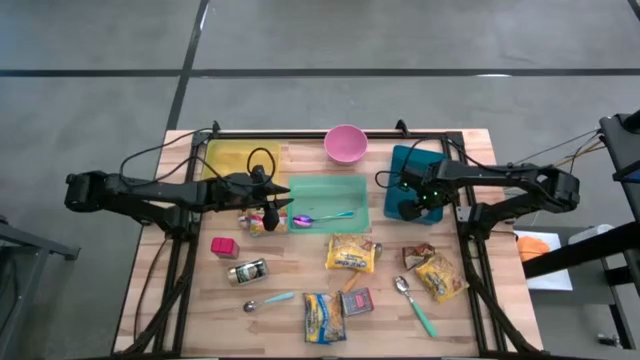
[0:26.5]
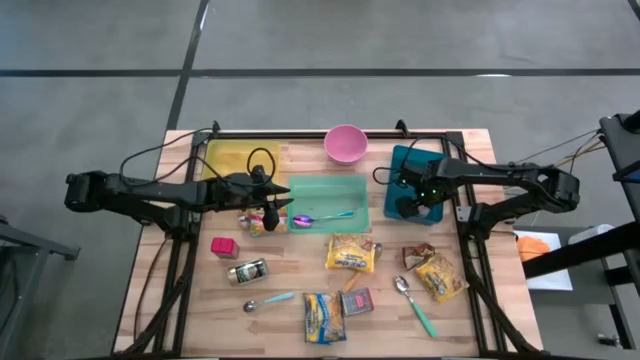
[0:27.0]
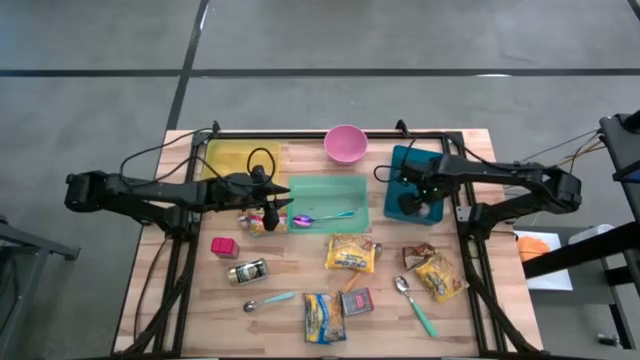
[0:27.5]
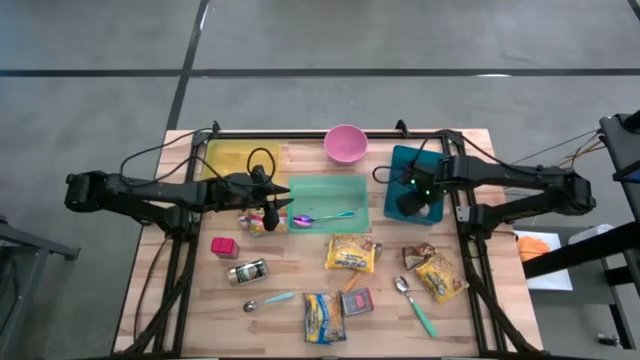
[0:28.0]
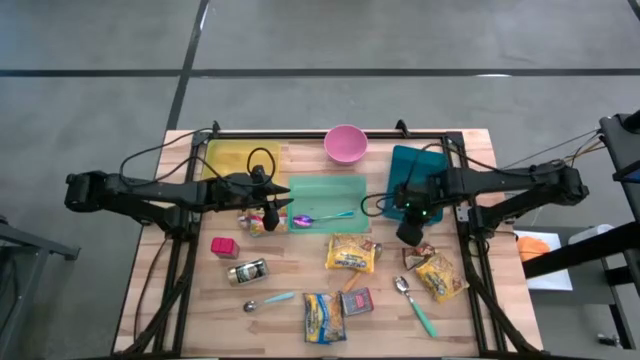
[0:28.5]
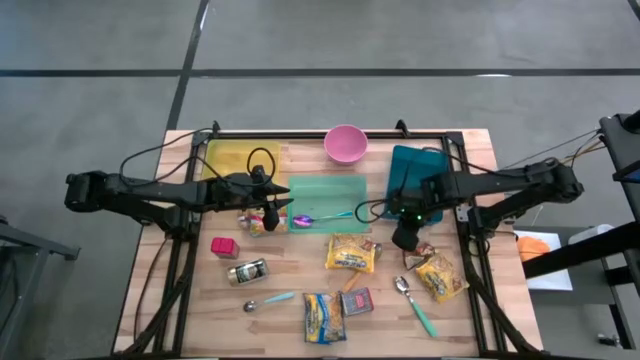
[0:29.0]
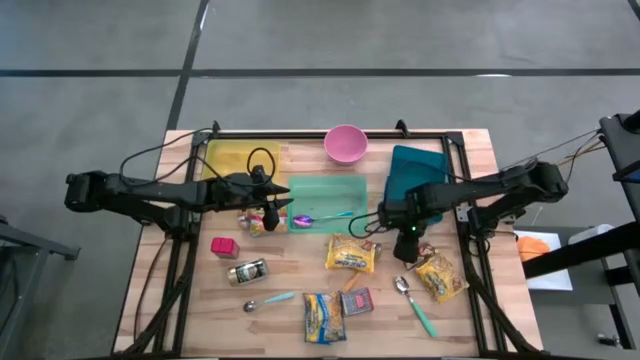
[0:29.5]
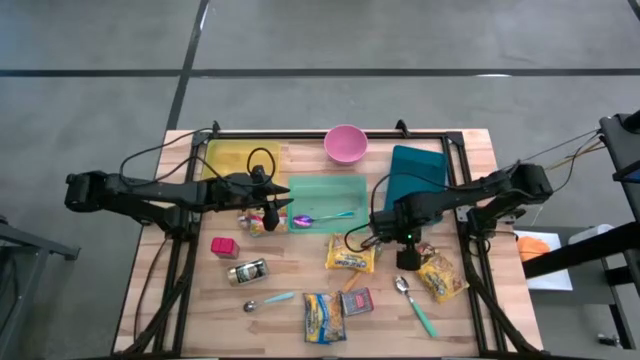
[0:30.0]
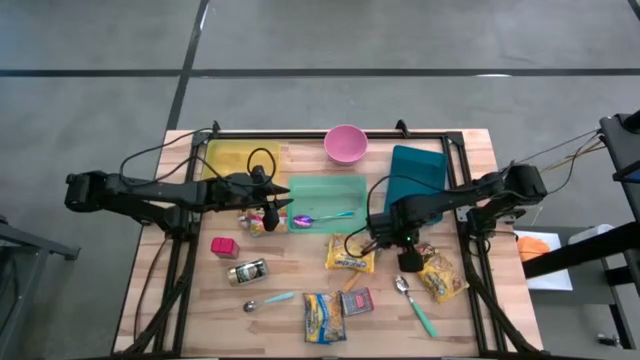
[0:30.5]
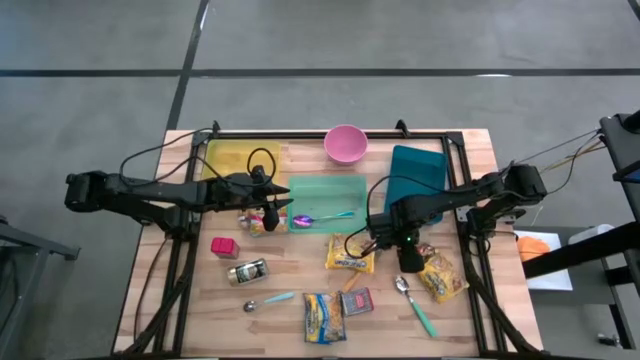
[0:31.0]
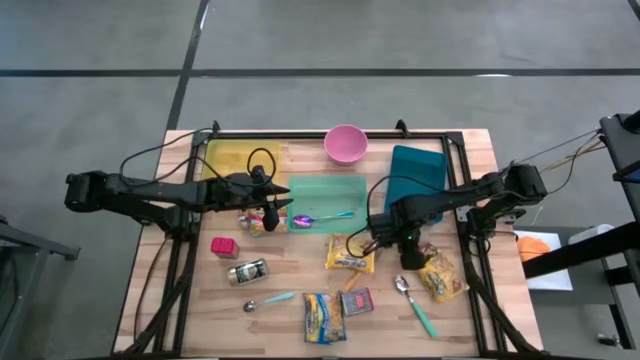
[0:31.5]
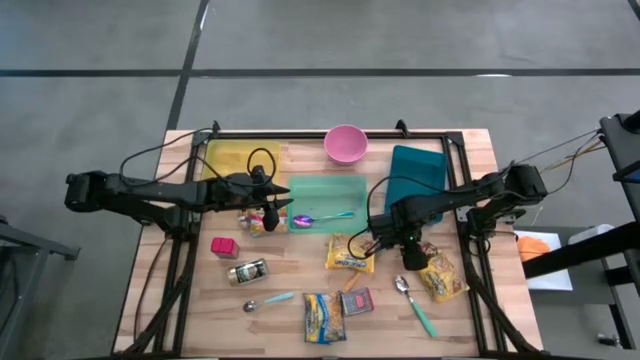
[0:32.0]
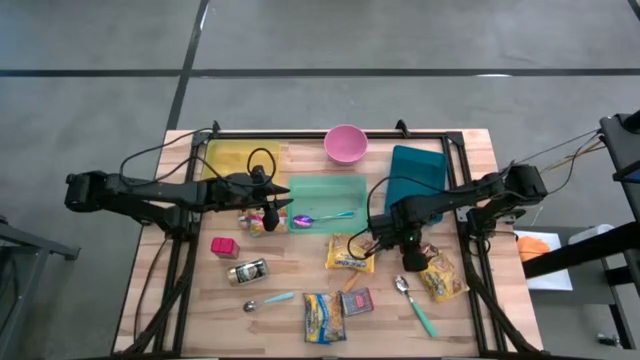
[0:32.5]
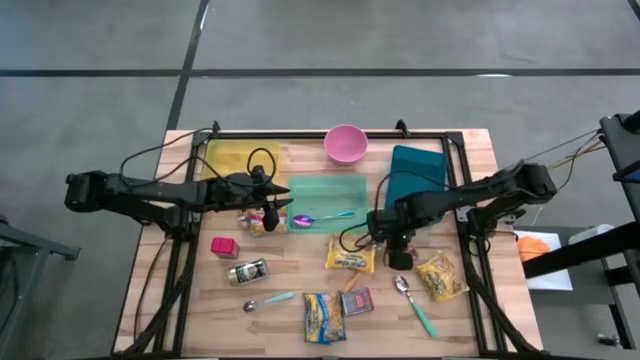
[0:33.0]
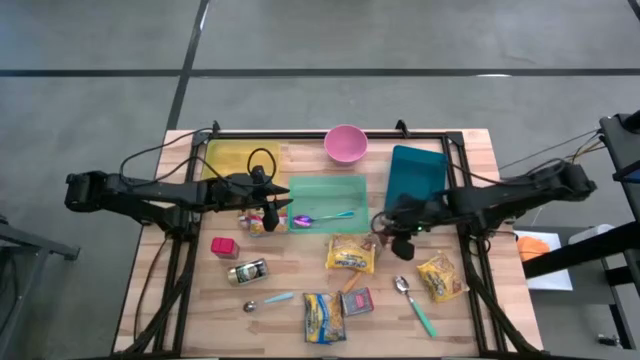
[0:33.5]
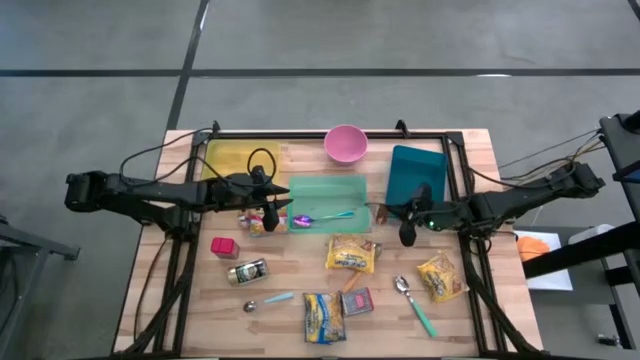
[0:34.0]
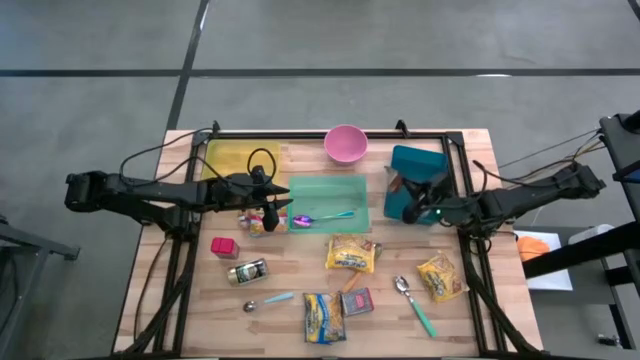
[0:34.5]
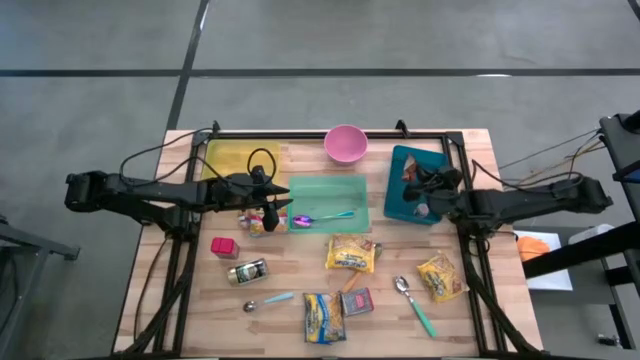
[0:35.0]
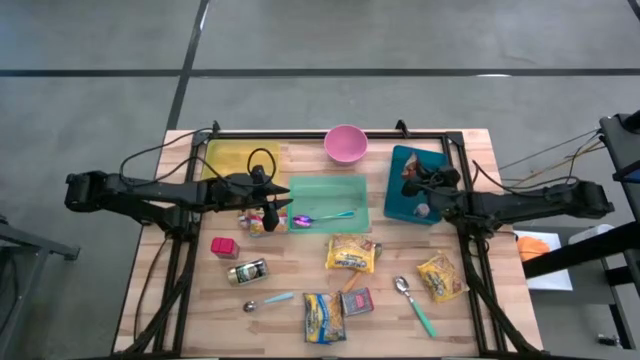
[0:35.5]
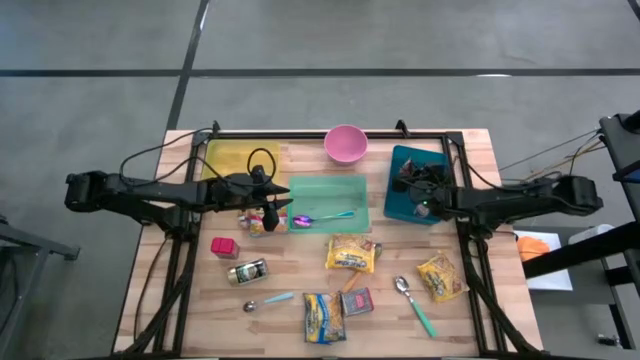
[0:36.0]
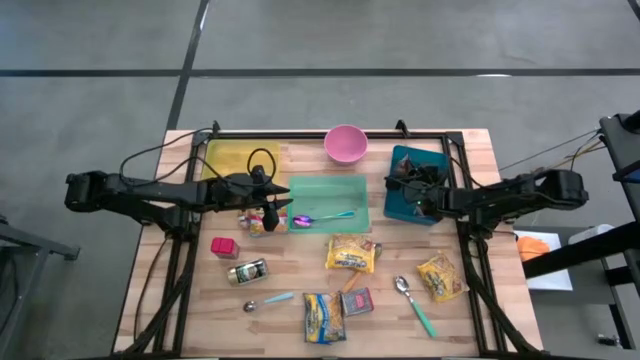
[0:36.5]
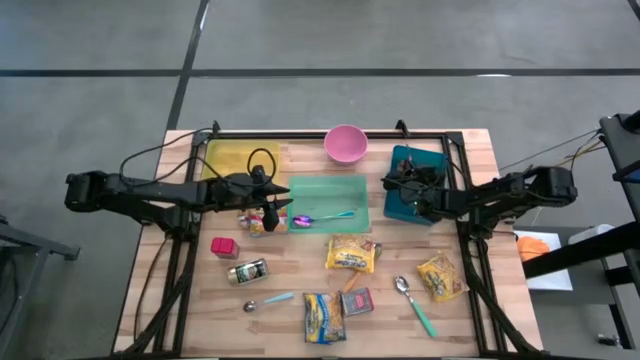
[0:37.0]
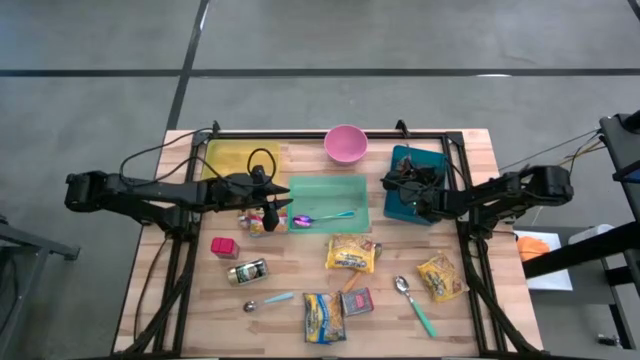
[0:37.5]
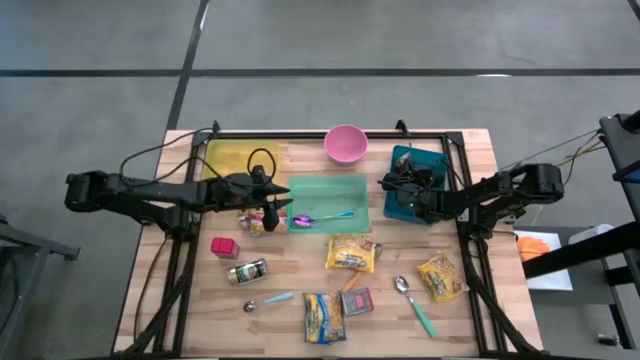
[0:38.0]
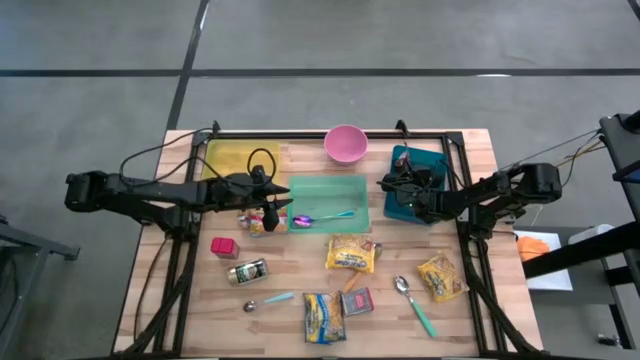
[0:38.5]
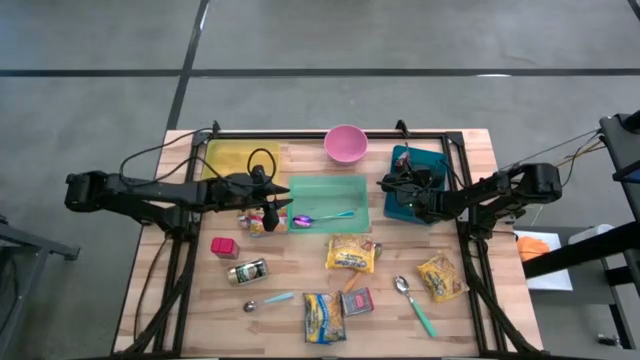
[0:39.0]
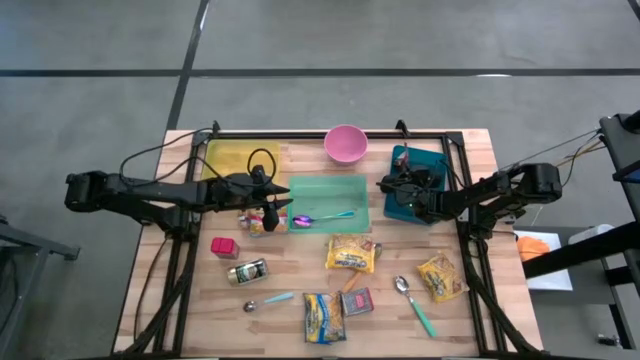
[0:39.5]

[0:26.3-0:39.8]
Put the orange seasoning pack into the blue bin

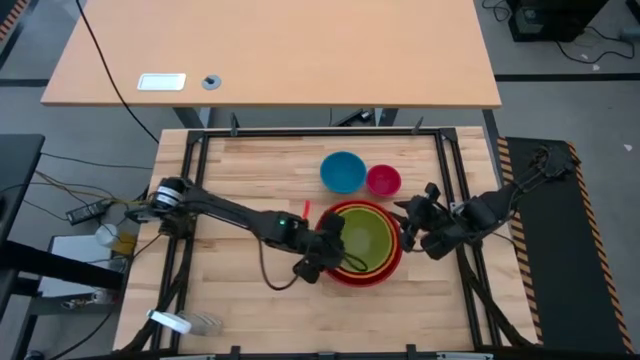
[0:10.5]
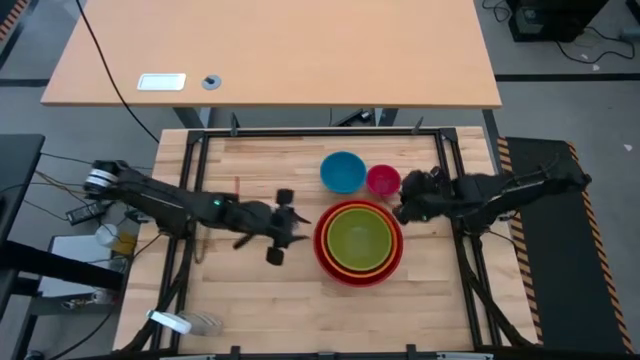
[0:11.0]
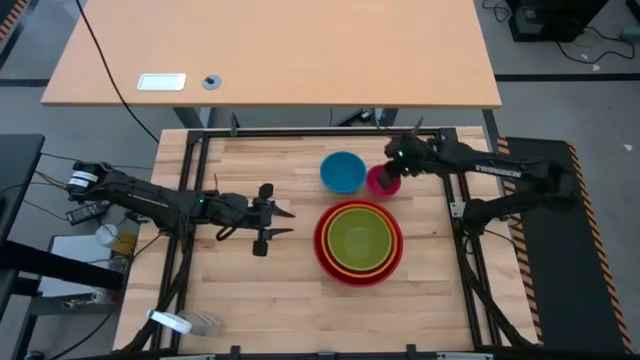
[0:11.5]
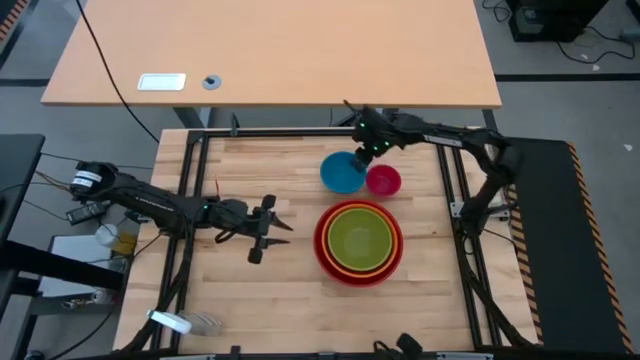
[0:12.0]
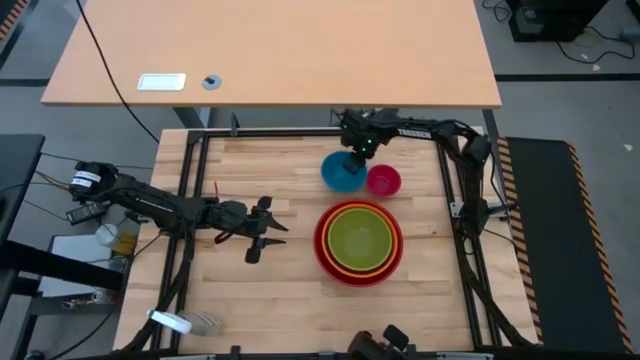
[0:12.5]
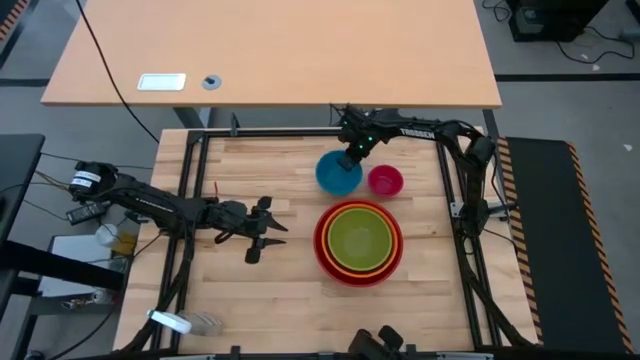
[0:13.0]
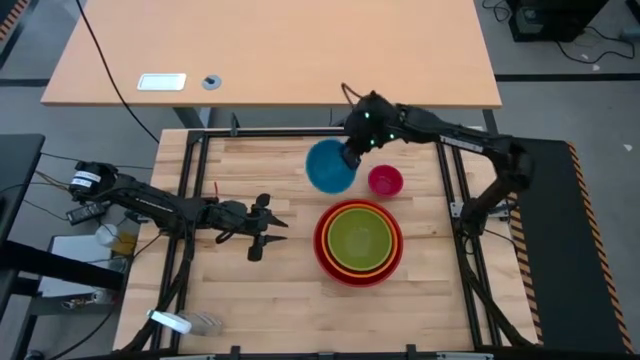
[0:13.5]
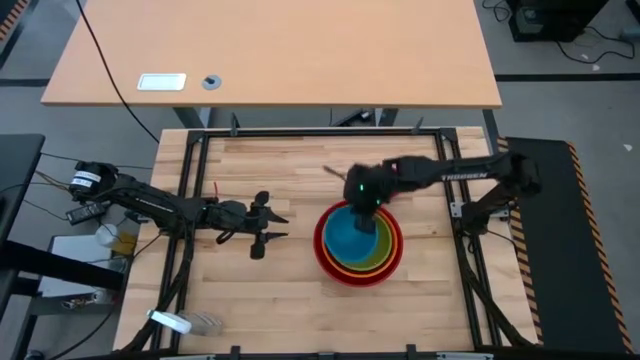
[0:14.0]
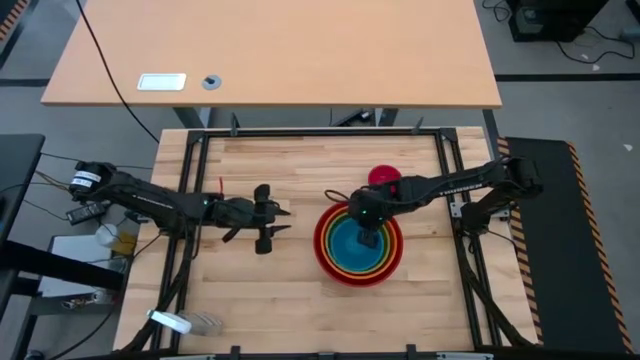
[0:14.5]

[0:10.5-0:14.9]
Stack the blue bowl on top of the green bowl

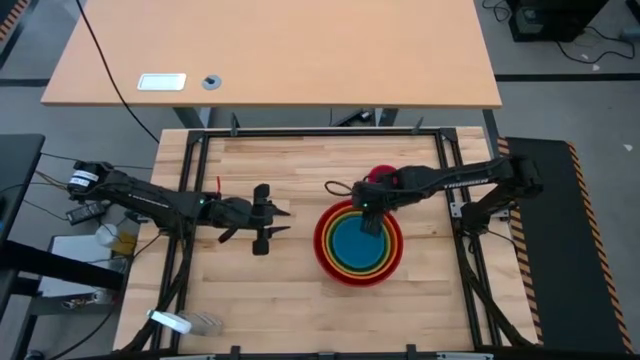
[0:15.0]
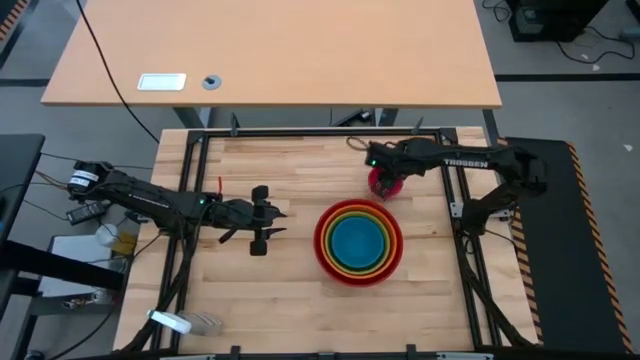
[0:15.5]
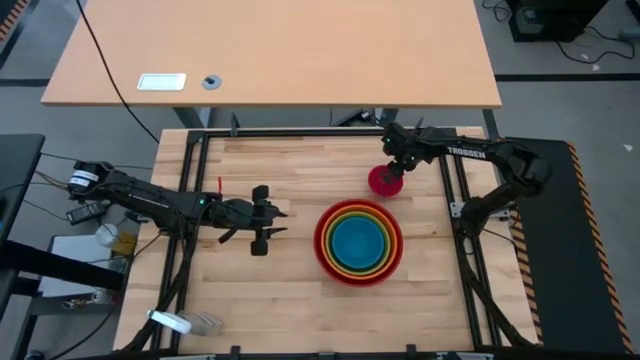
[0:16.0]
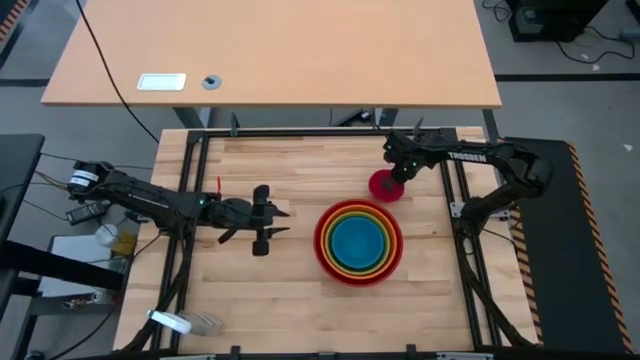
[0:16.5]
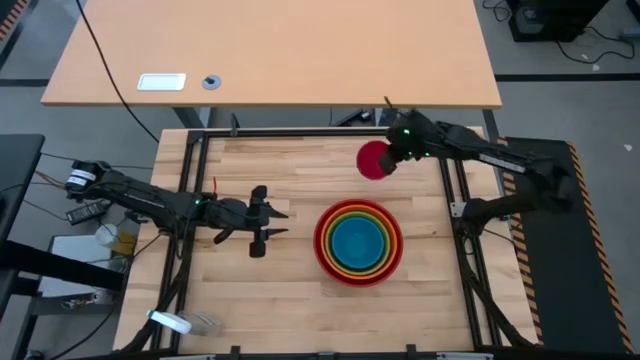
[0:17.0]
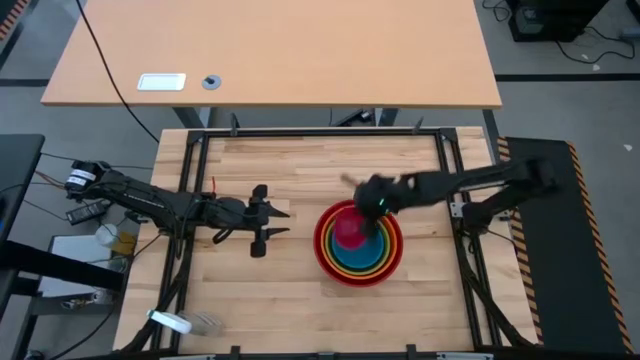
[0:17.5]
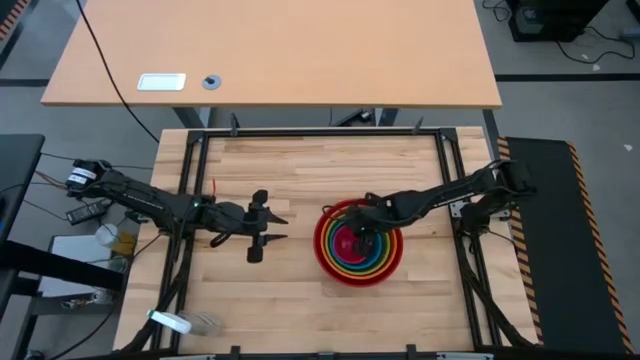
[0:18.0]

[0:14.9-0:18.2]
Stack the pink bowl on top of the blue bowl
